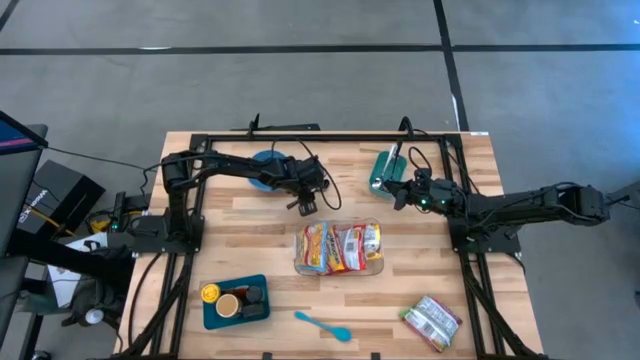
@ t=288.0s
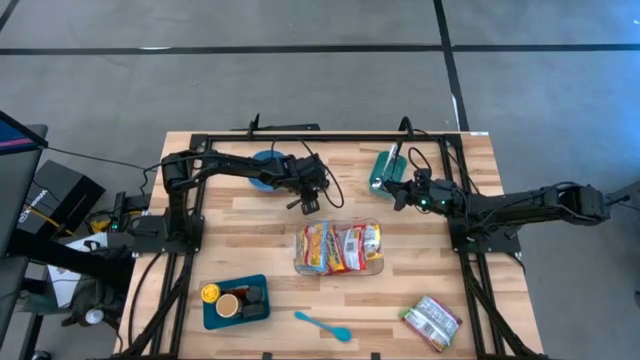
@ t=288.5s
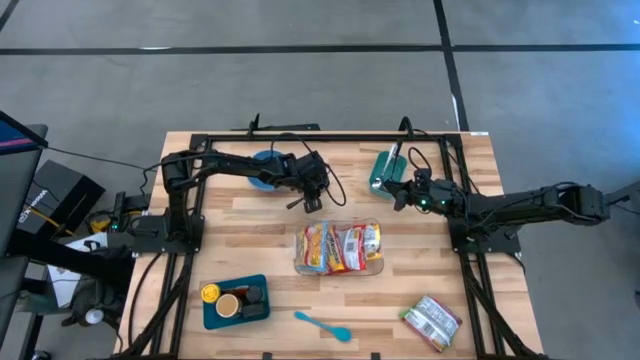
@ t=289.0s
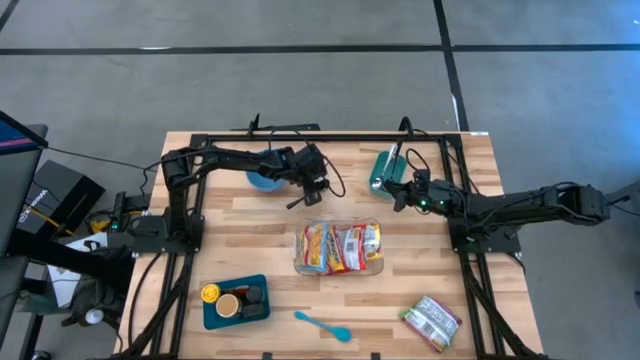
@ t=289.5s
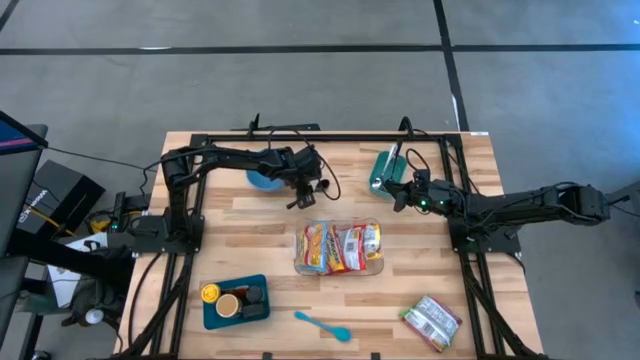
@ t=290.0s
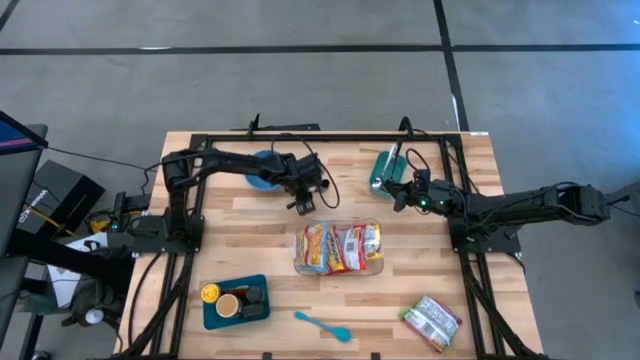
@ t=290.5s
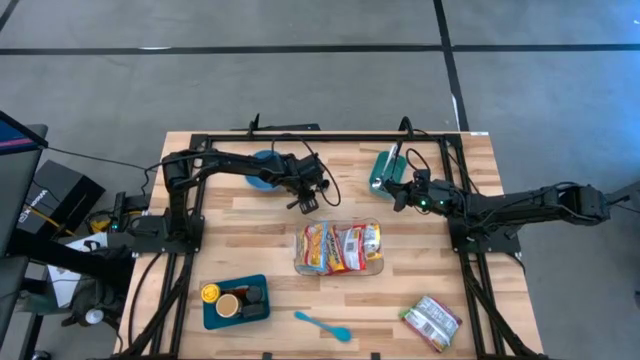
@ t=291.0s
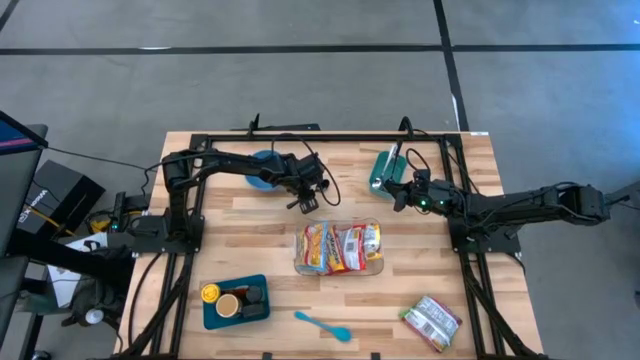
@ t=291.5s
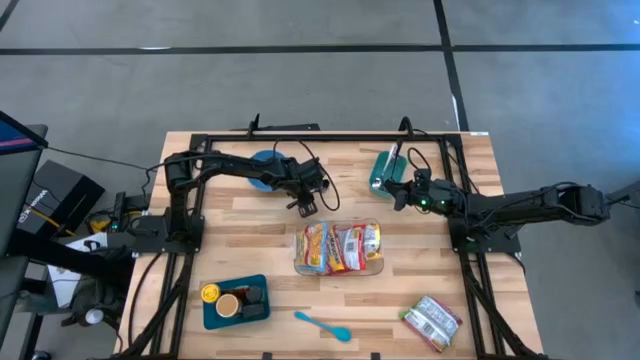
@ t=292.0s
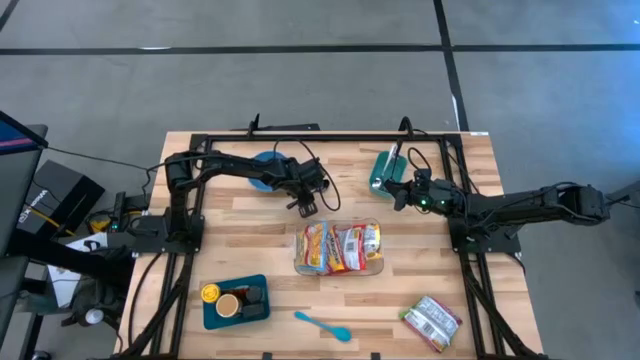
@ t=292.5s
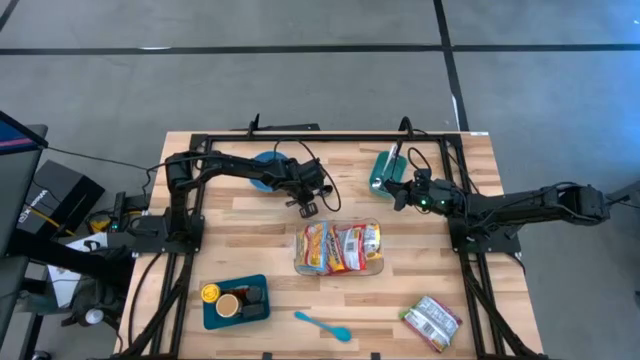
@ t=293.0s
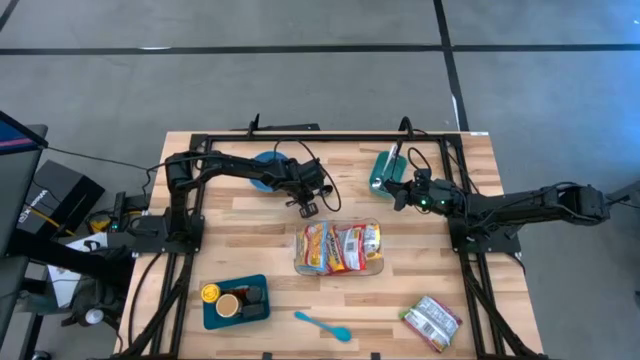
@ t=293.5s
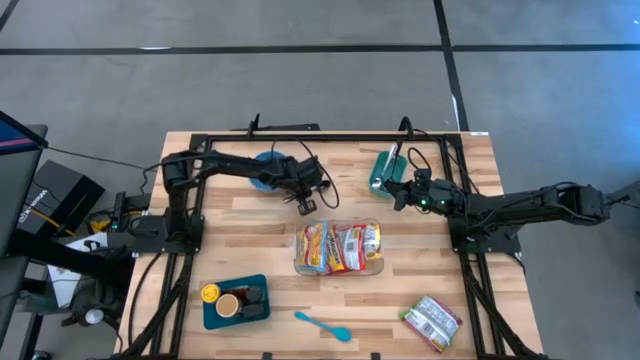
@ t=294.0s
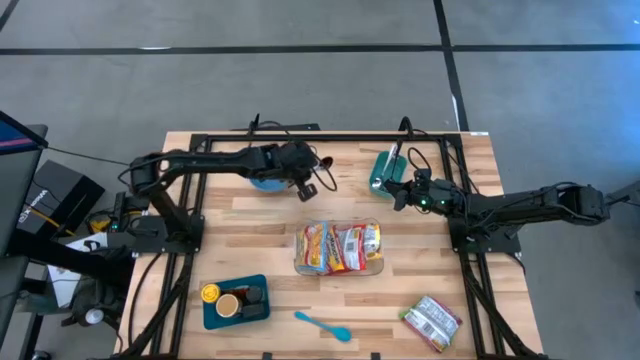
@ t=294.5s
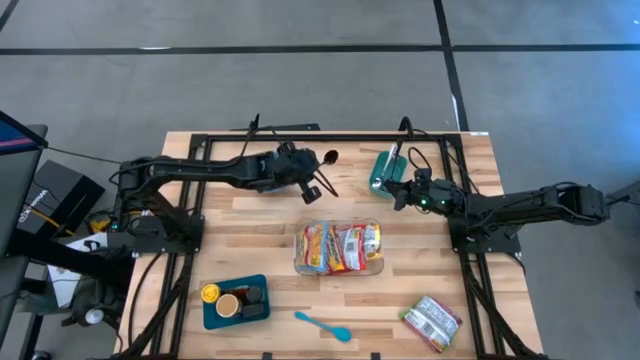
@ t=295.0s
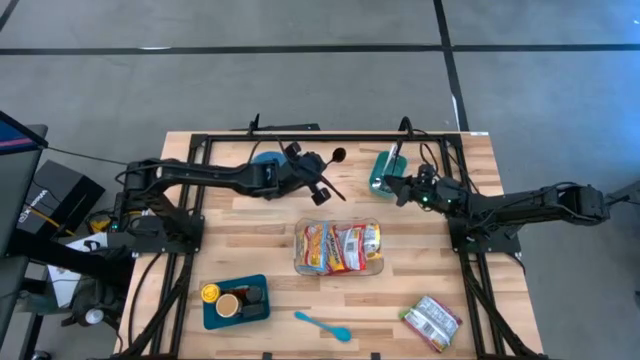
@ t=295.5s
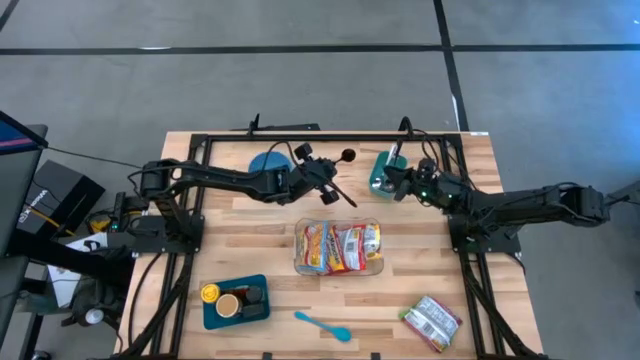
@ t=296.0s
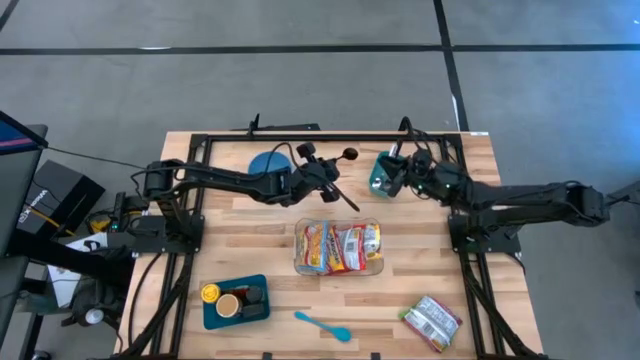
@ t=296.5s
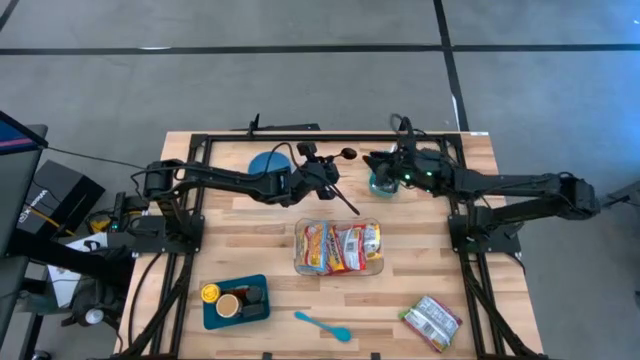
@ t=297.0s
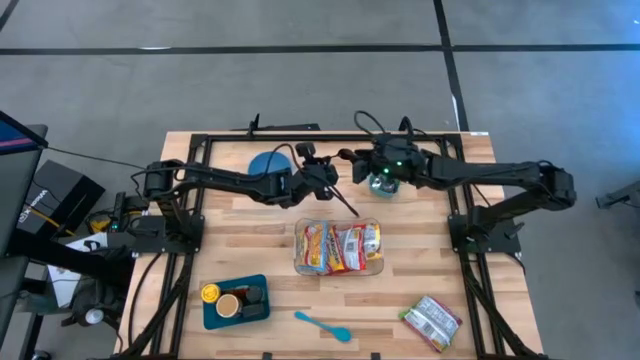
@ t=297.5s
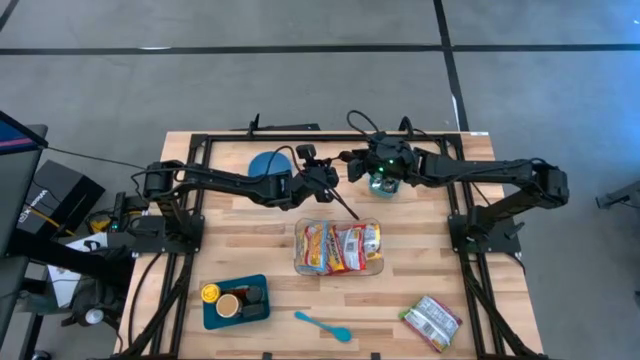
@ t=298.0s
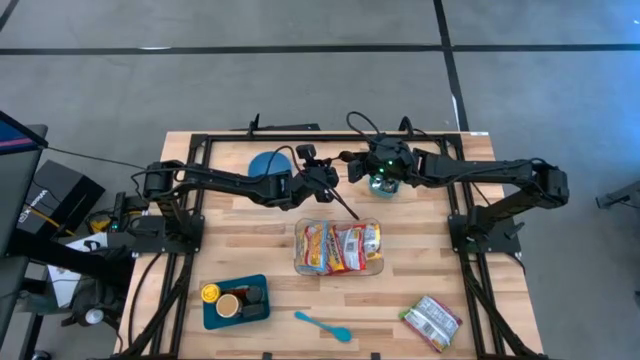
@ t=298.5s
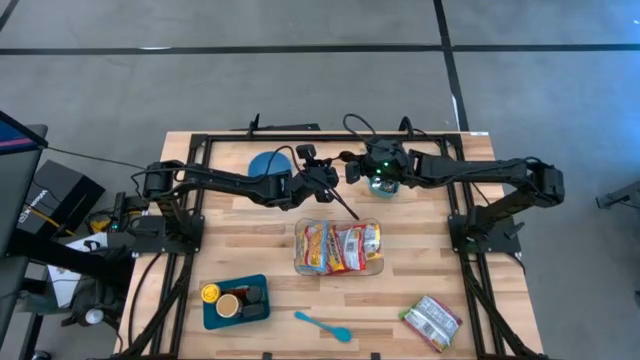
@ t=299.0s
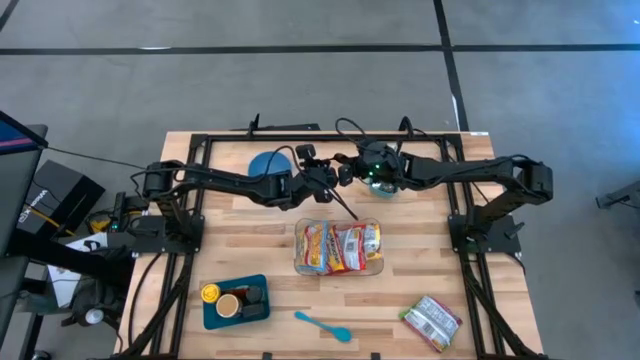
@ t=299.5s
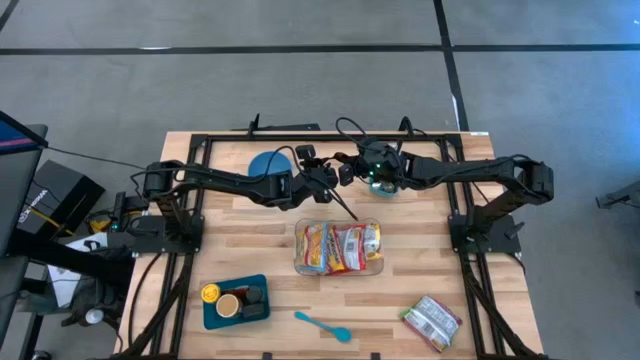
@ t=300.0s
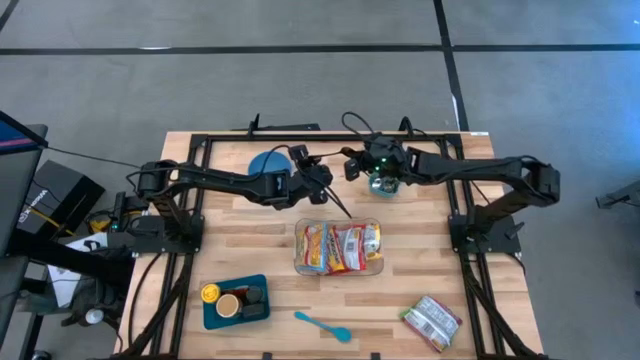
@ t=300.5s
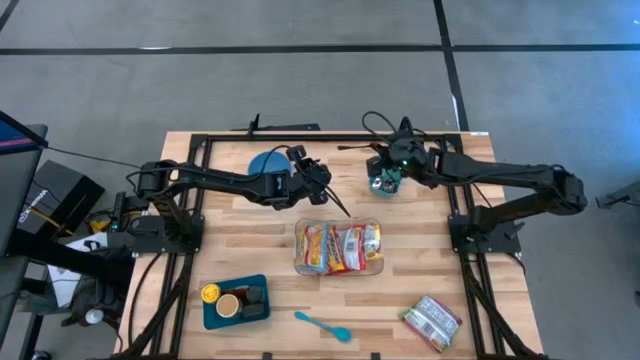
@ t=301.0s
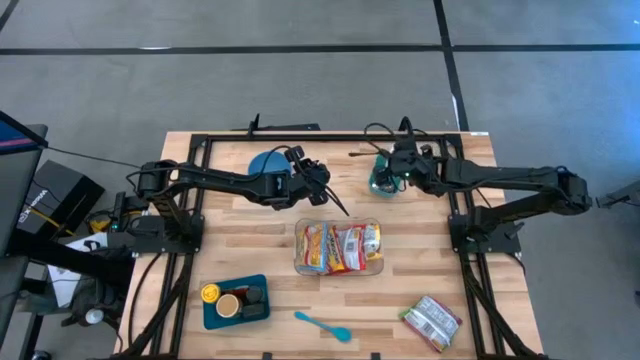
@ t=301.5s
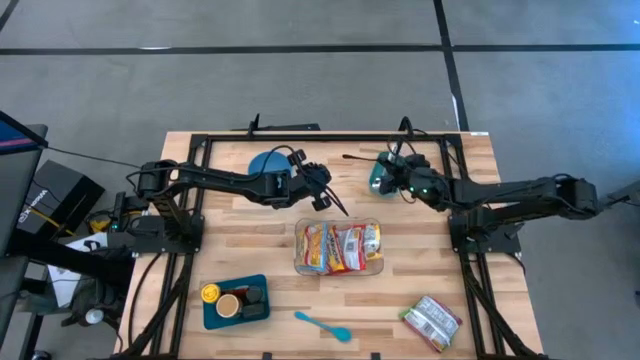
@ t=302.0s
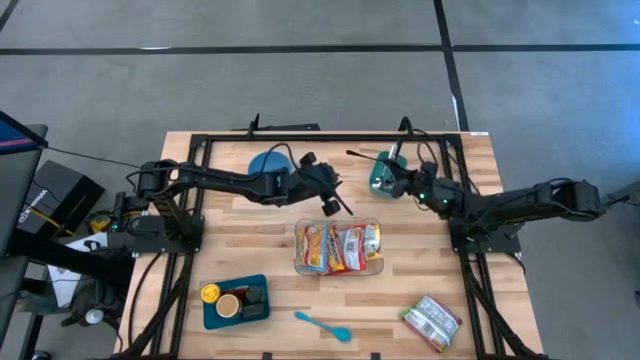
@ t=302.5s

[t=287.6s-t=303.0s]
Task: Pick & Place Food Item
Put the black spoon into the blue bin

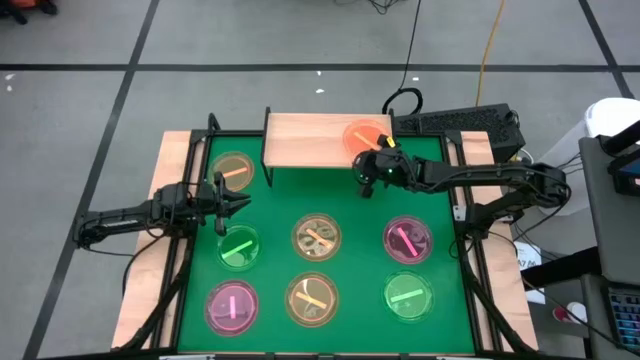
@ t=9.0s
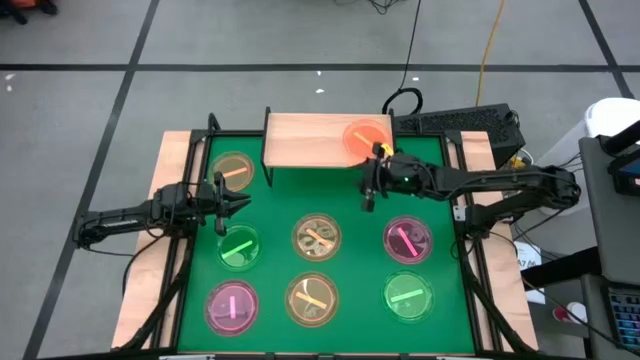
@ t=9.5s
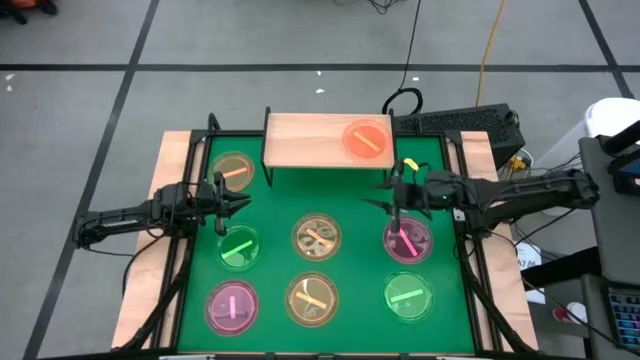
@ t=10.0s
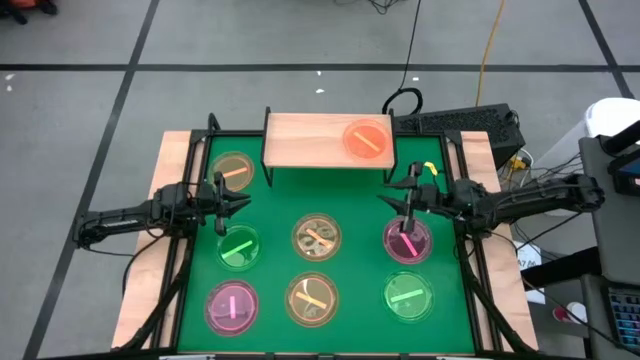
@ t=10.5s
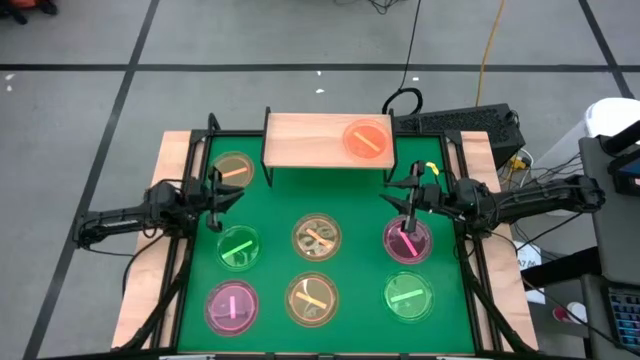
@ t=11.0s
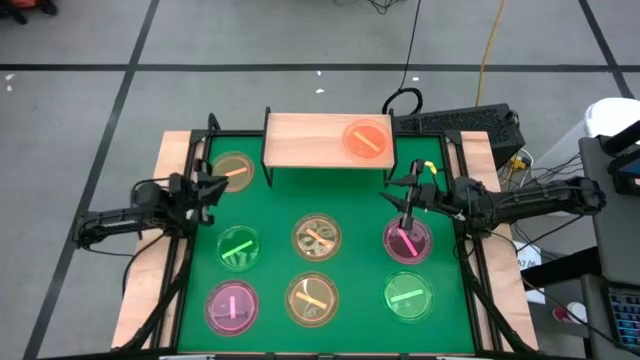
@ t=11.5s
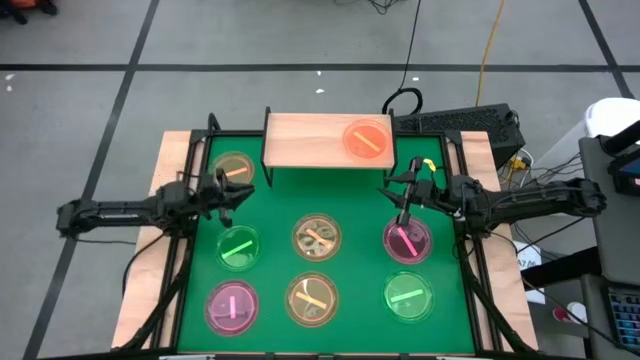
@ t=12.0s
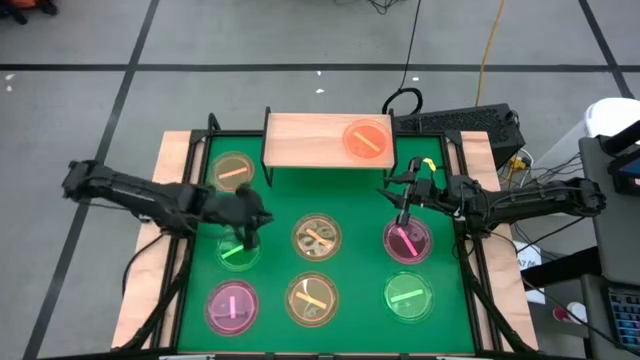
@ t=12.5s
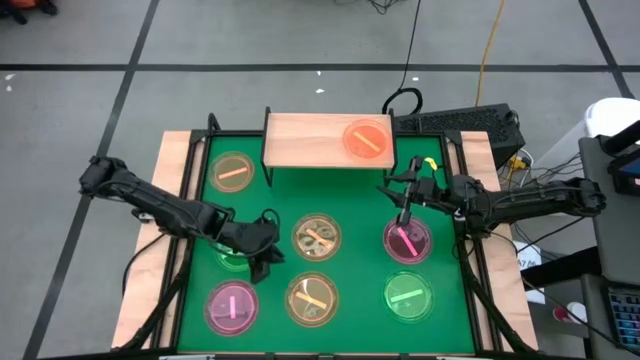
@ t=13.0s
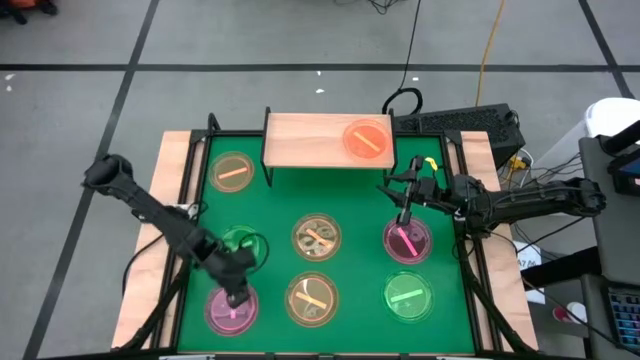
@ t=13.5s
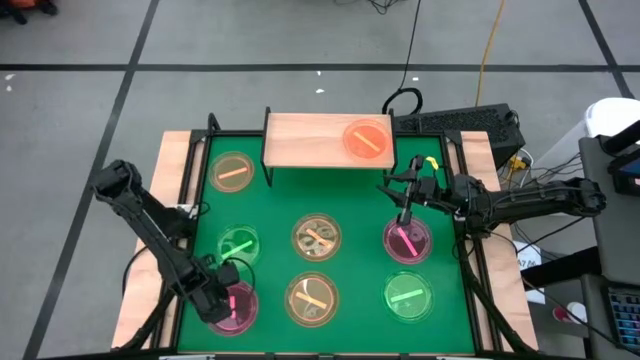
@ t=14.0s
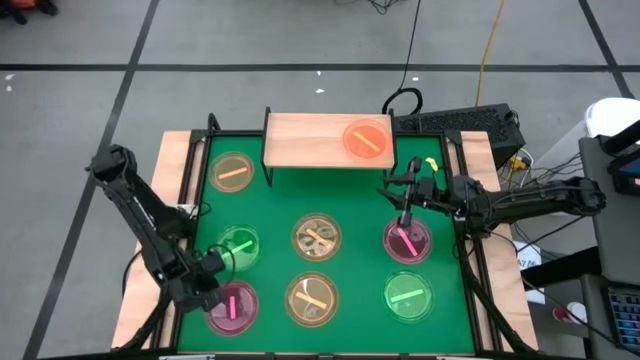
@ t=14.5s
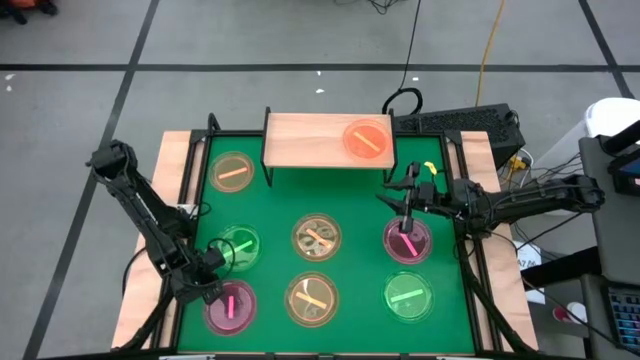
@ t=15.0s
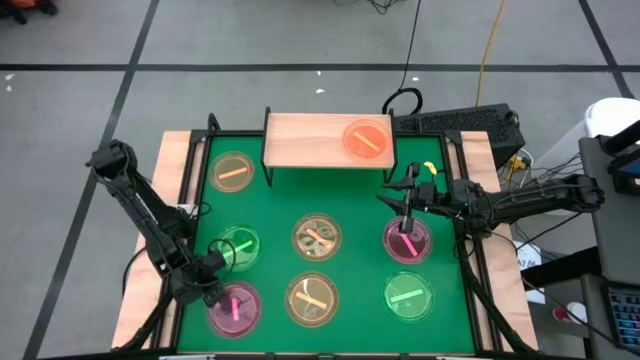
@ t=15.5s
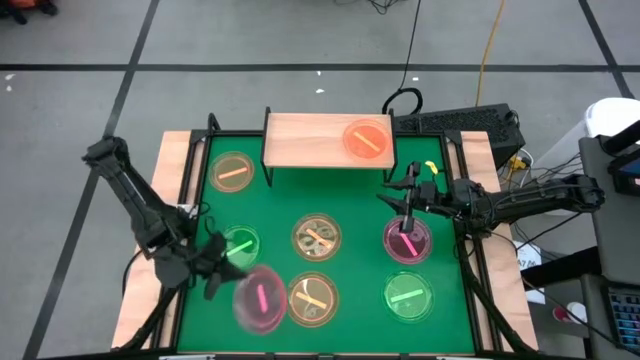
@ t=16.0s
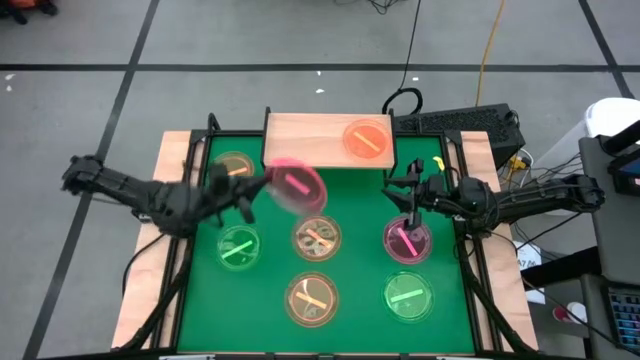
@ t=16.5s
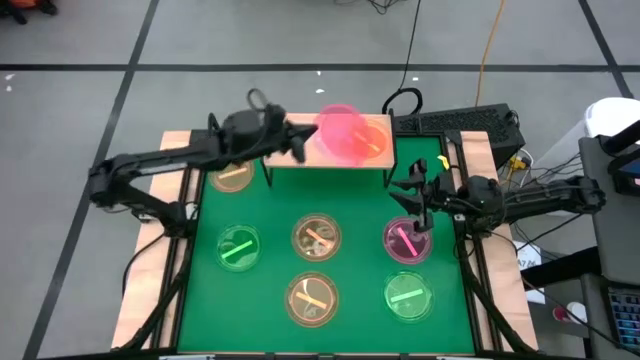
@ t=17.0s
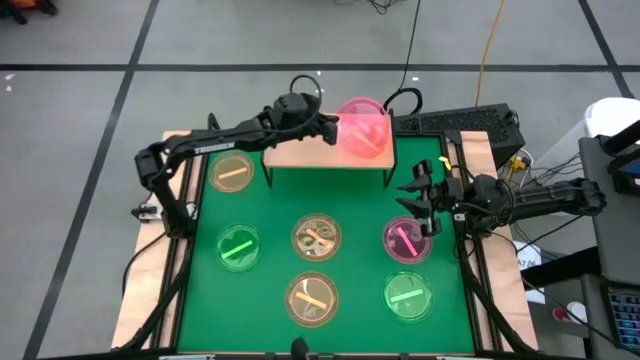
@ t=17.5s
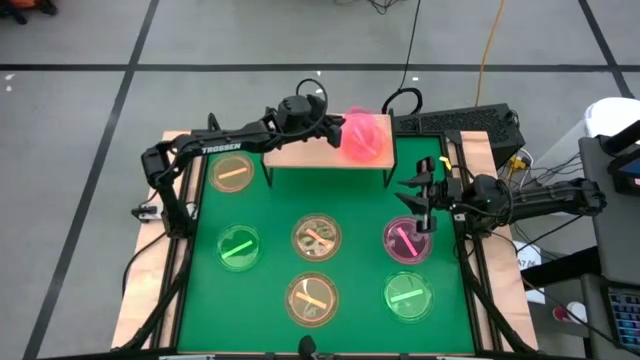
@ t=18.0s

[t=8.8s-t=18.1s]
Task: Place and stack plates onto a shelf
Stack the bottom pink plate on top of the orange plate on the shelf
